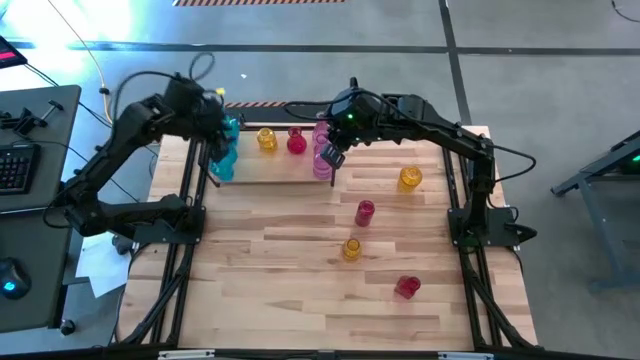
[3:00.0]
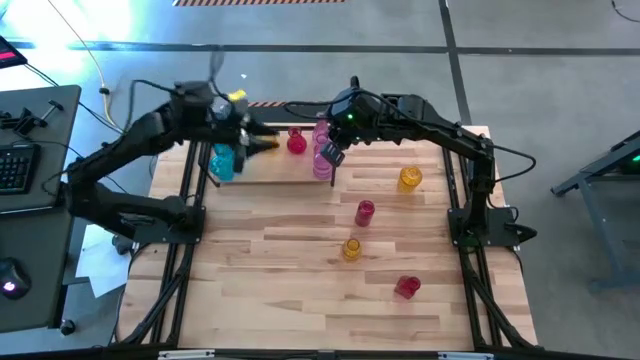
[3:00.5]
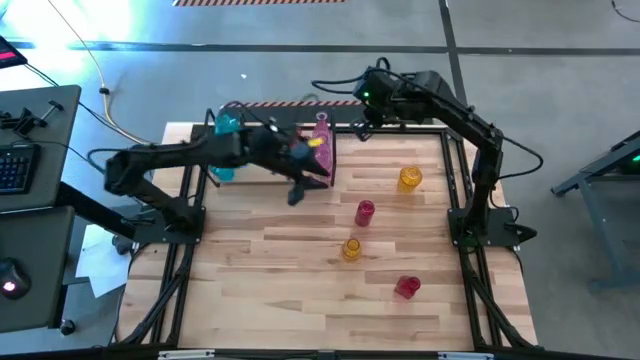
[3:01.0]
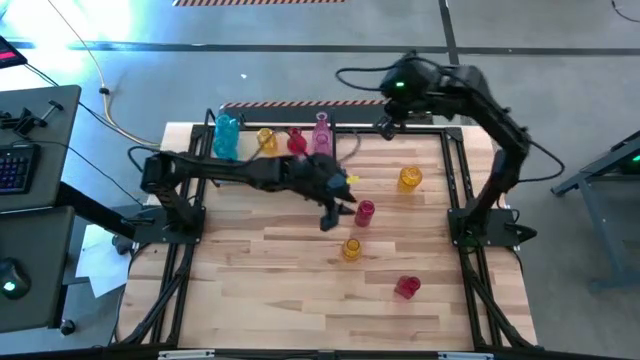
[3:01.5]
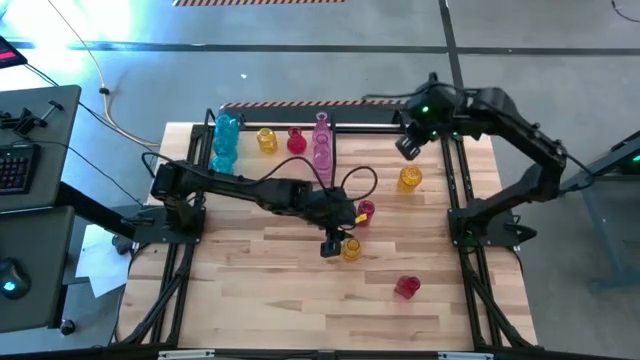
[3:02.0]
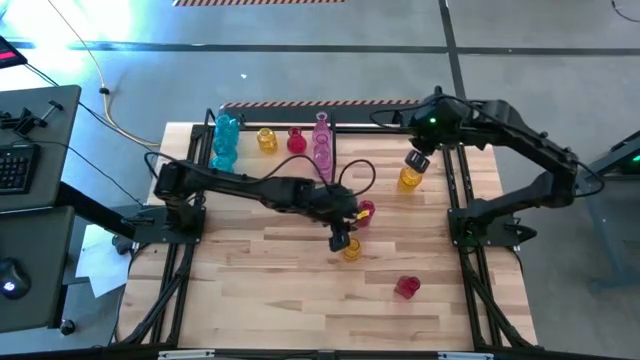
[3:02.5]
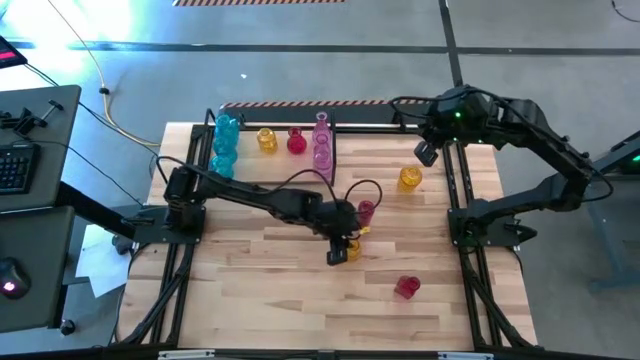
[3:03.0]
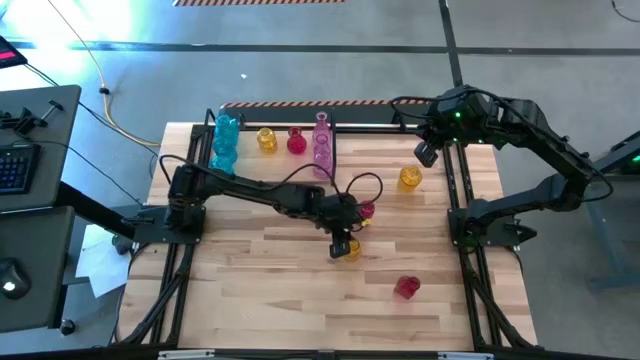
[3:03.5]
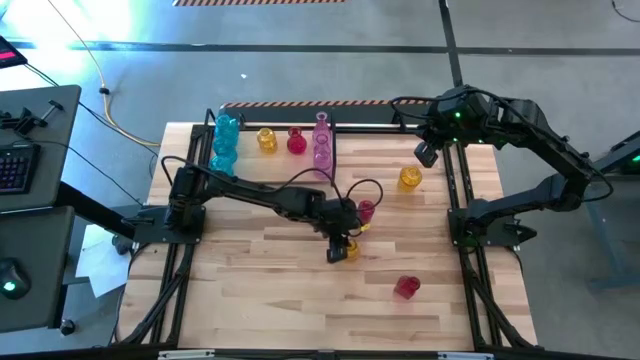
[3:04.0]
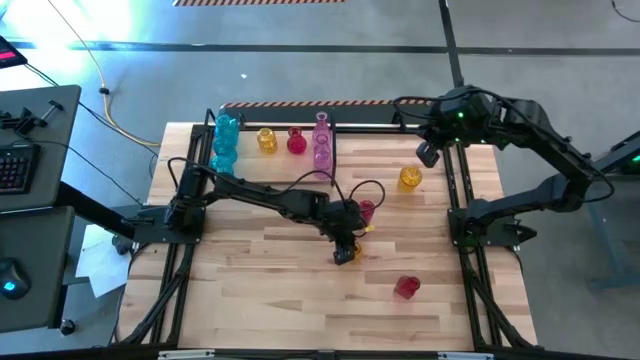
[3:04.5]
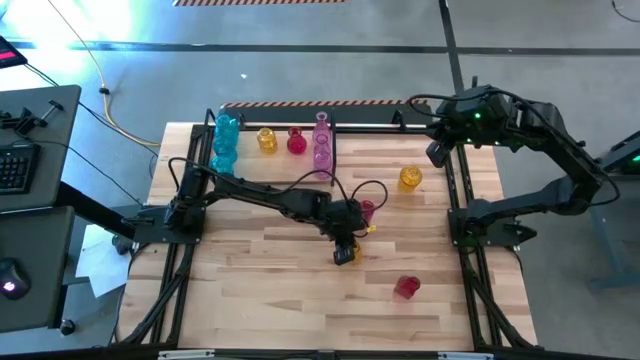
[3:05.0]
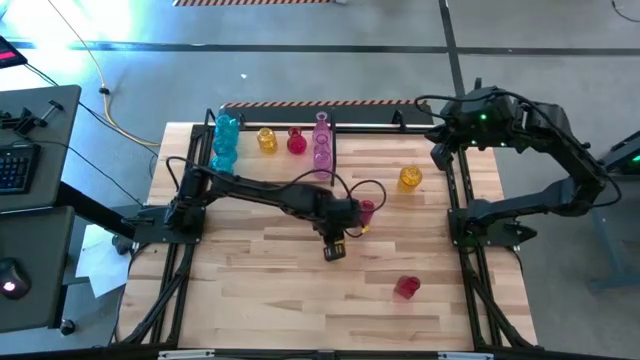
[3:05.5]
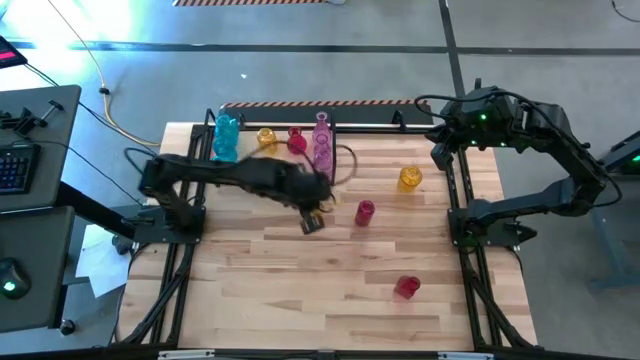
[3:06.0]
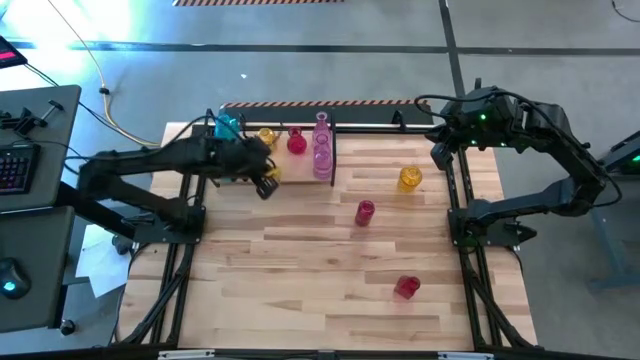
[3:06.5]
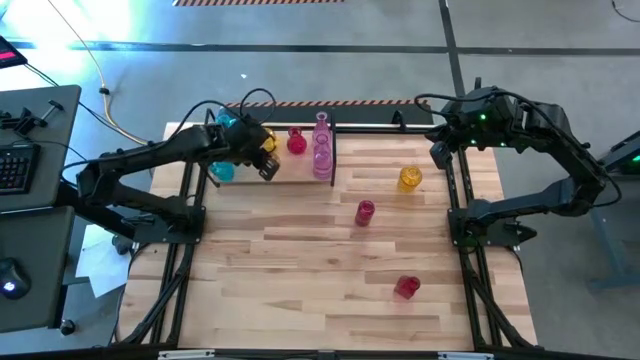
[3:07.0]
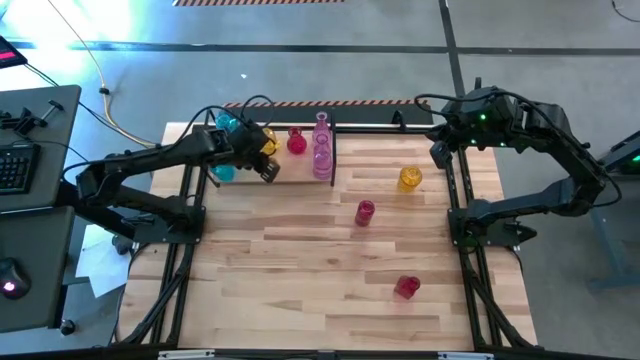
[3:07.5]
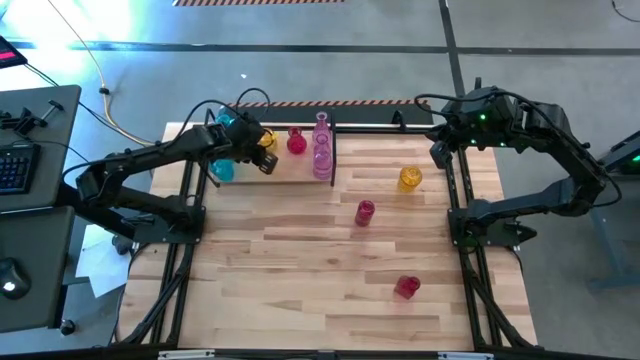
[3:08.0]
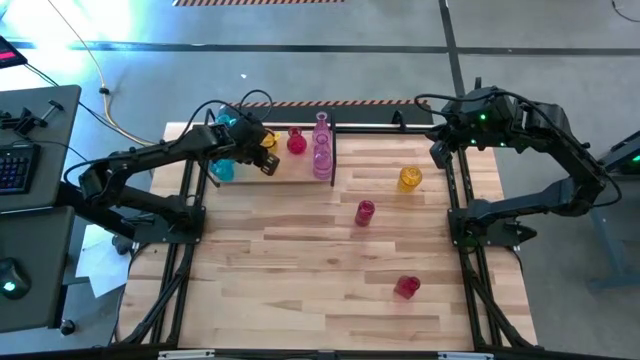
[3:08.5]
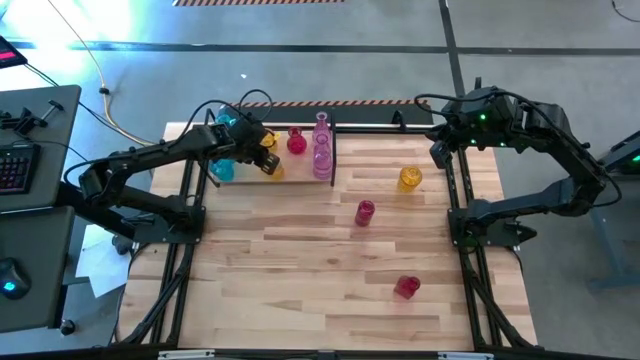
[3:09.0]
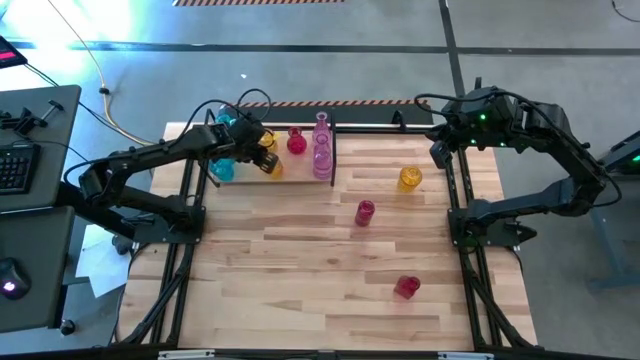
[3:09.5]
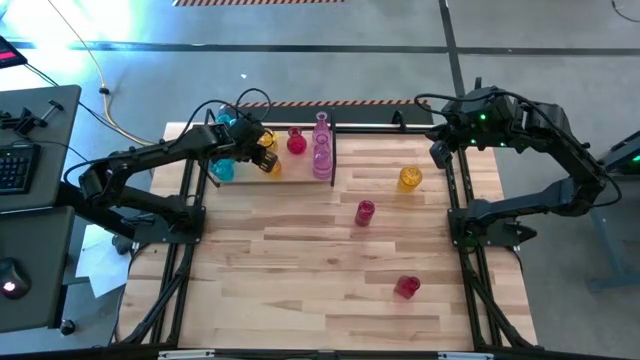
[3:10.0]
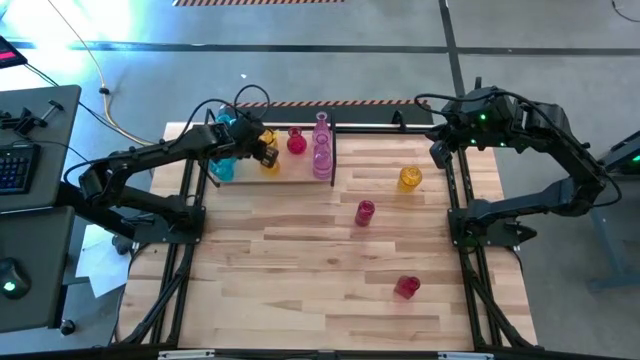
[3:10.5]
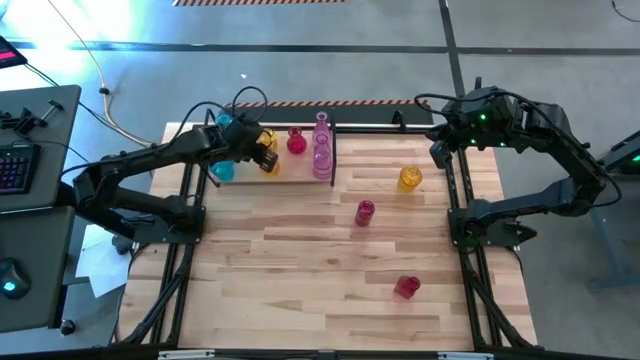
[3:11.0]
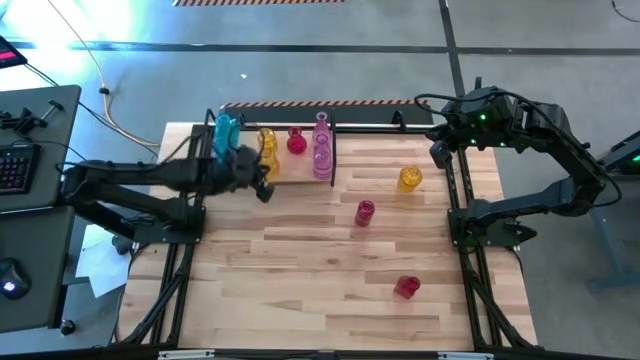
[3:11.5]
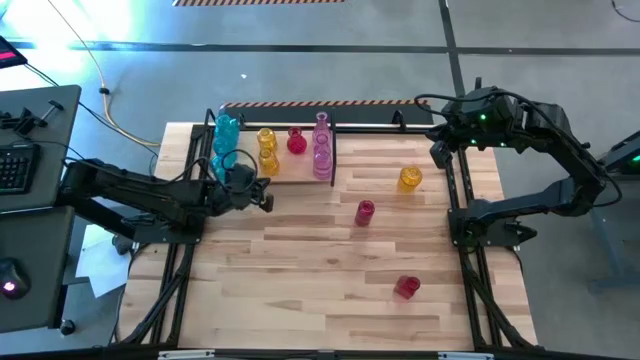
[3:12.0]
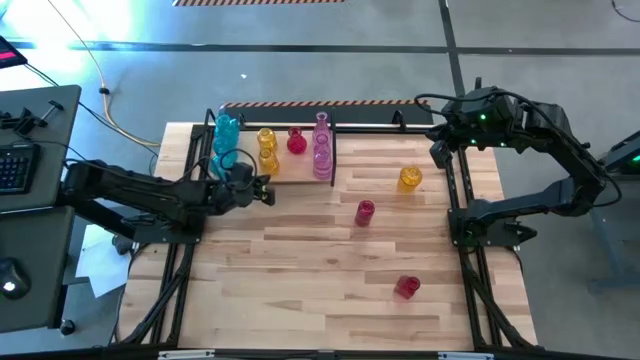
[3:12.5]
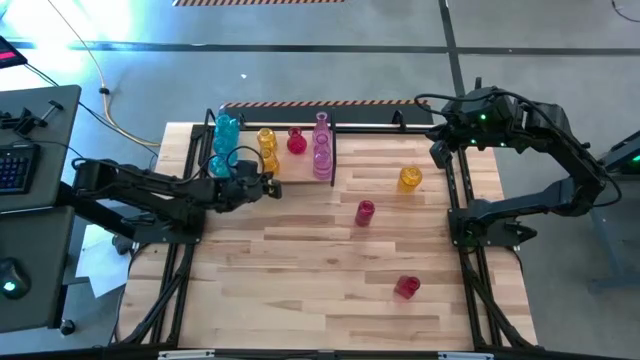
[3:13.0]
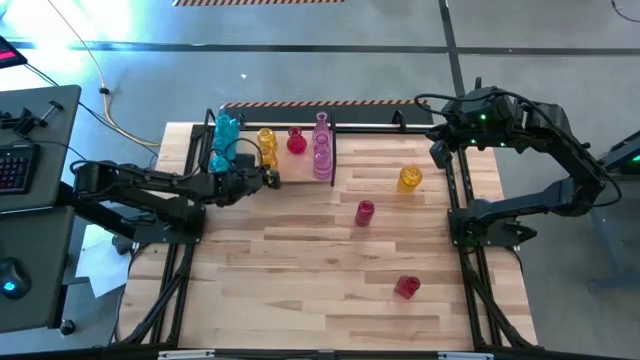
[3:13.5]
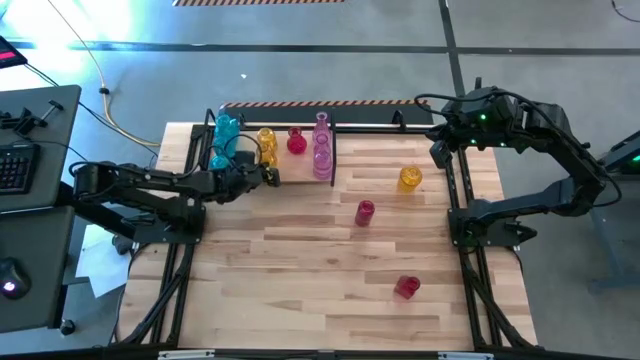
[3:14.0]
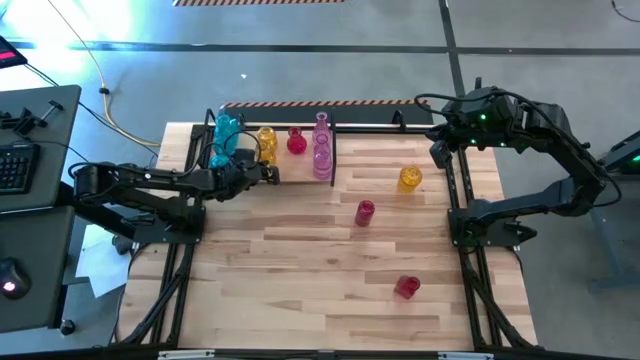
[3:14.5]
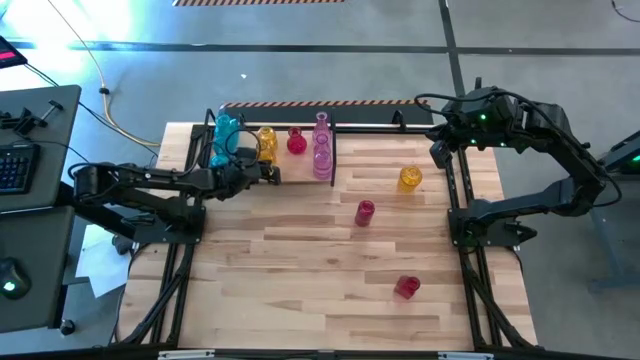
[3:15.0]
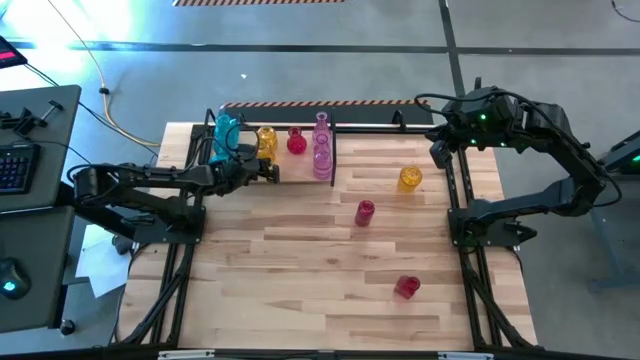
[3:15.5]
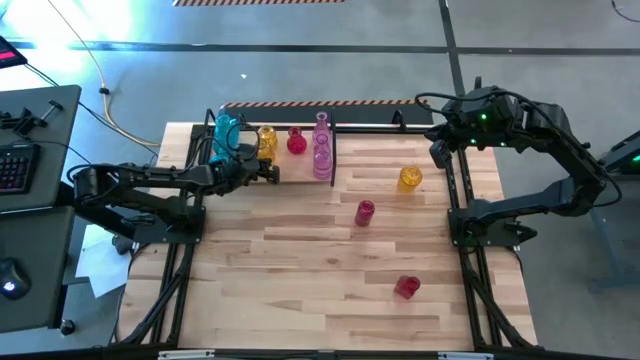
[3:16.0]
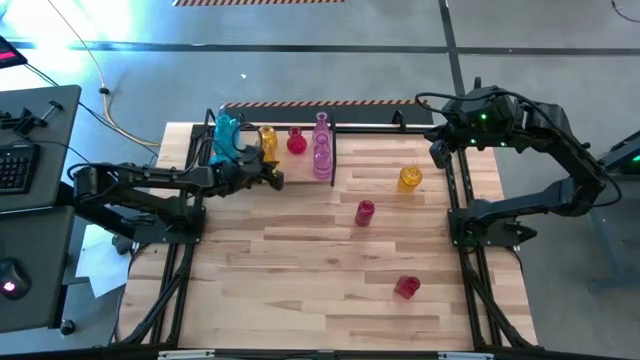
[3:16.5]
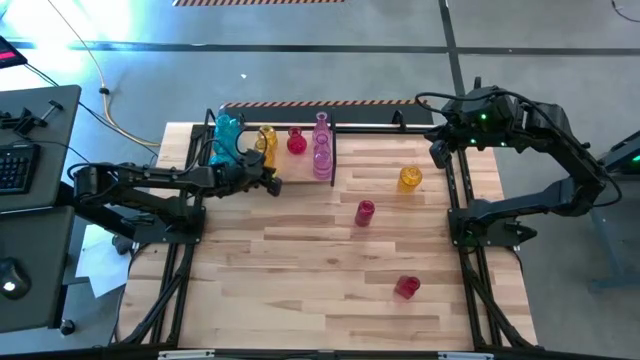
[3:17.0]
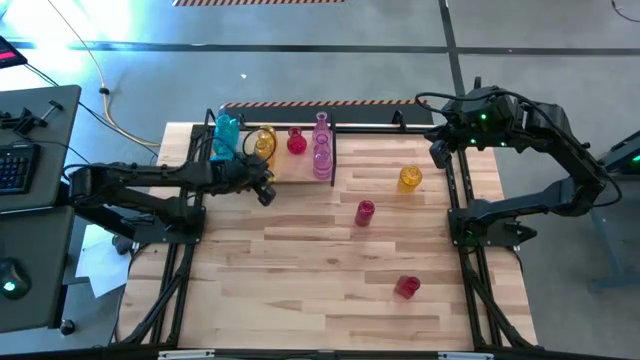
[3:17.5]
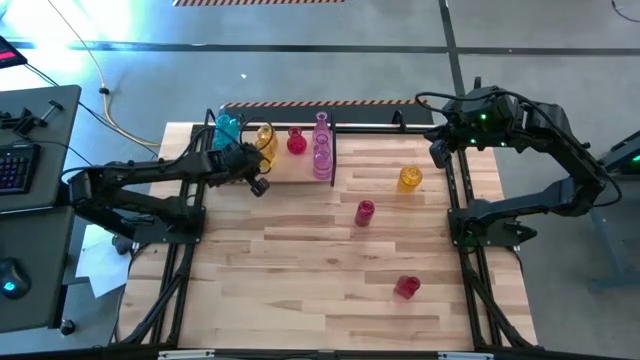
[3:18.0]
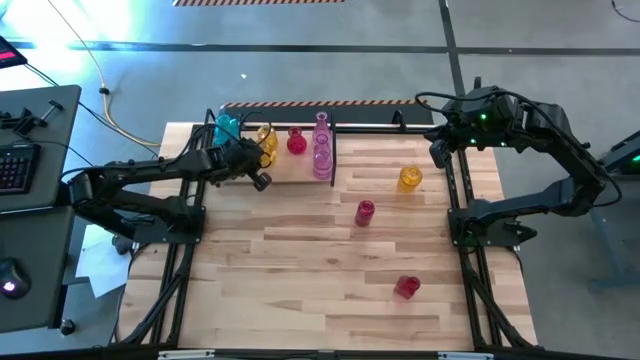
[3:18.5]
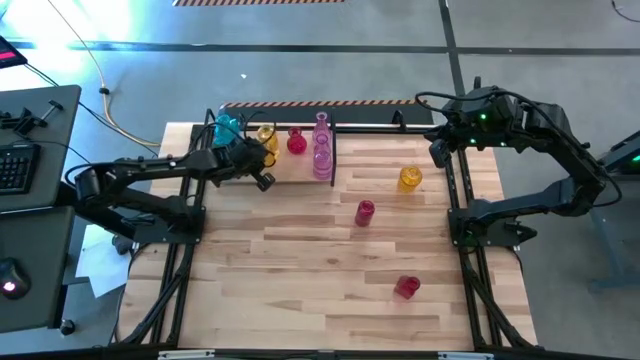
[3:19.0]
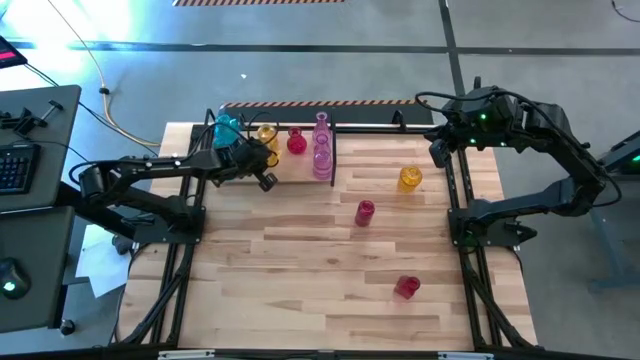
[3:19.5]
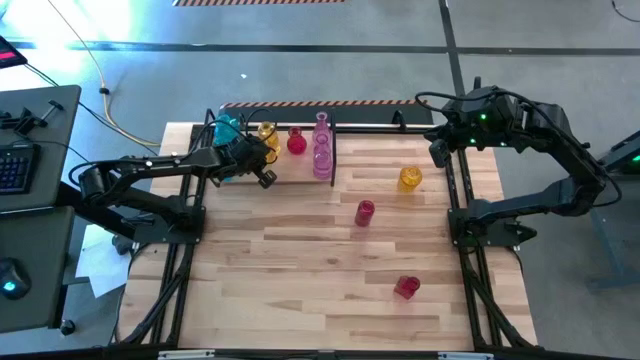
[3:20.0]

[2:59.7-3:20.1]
Task: sort vases onto shelf
Put the bottom yellow vase on the shelf aligned with the other yellow vase

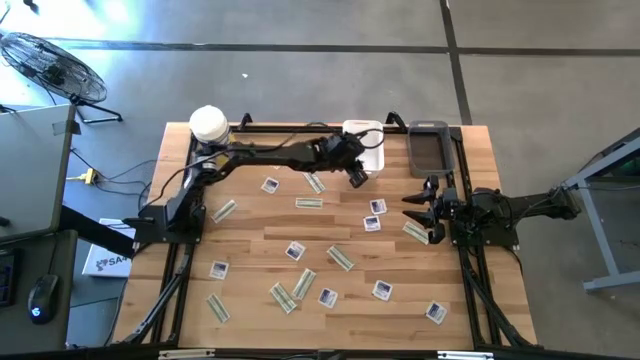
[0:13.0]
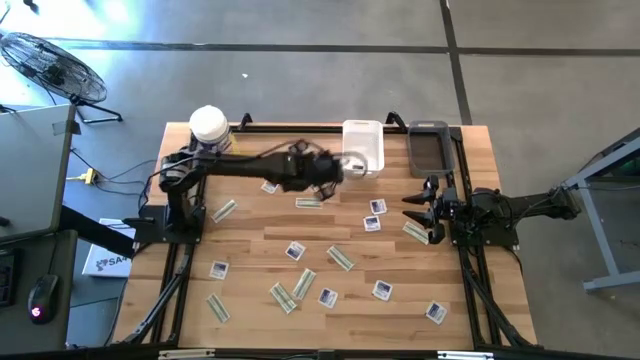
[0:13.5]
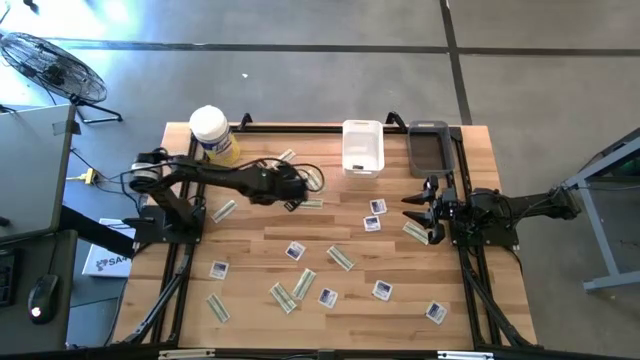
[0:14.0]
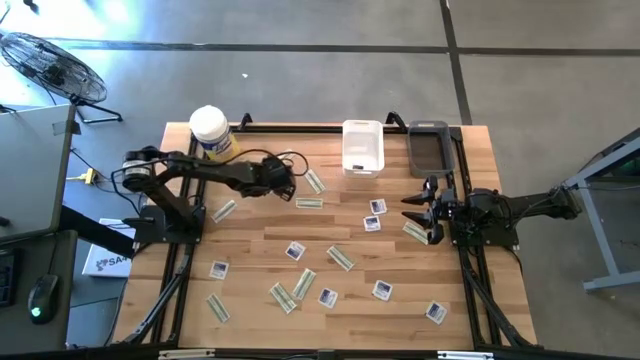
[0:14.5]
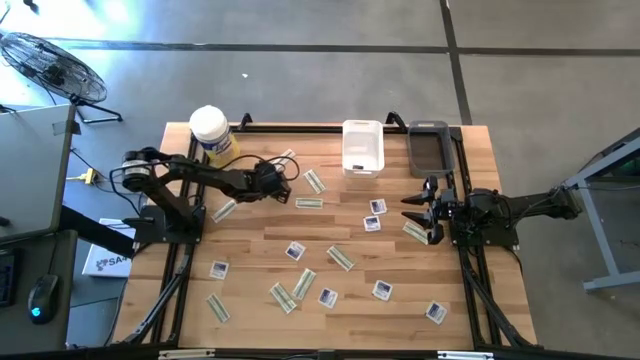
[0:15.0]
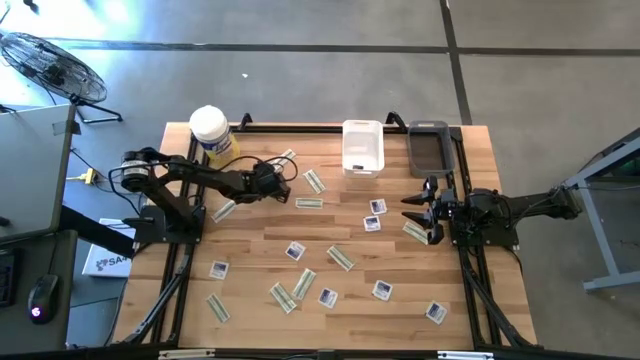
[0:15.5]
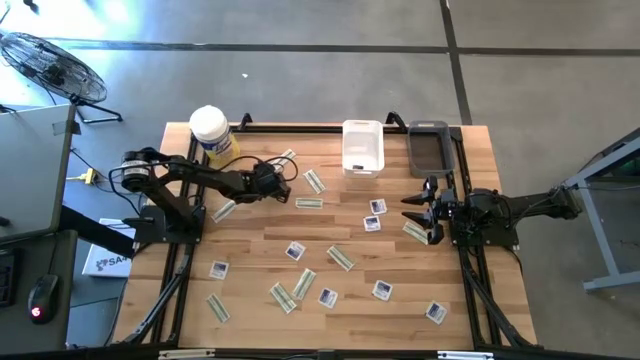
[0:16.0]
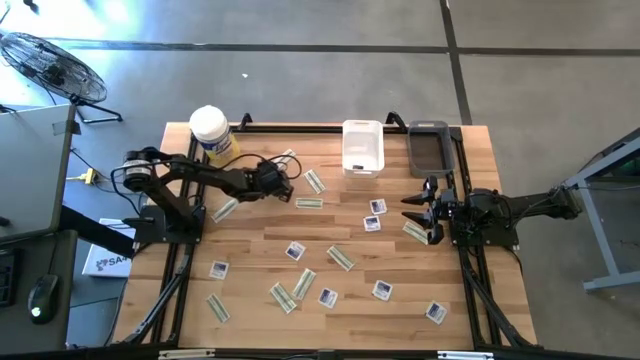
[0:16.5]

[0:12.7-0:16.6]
Task: Pick & Place First Aid Supplies
Put the blue alcohol pad into the white bin
